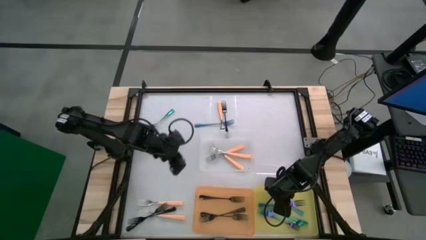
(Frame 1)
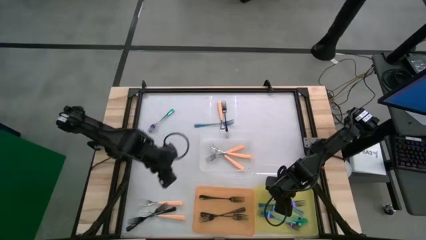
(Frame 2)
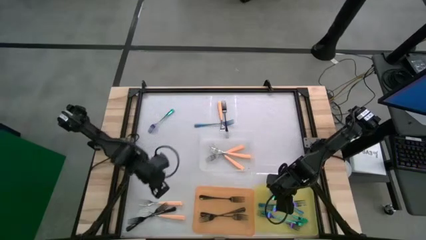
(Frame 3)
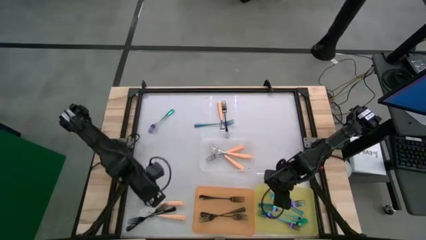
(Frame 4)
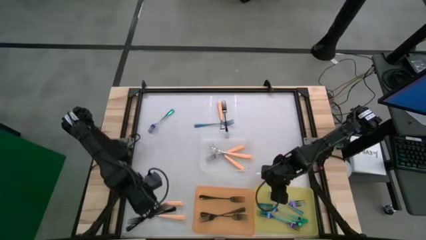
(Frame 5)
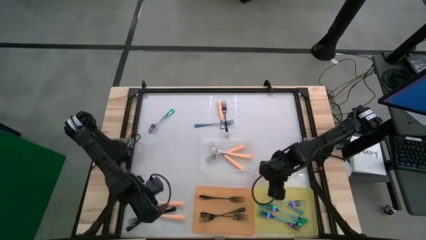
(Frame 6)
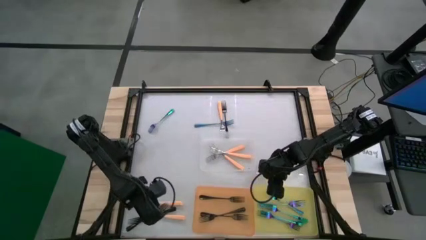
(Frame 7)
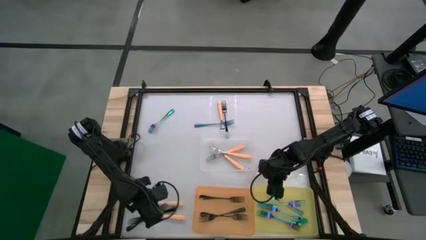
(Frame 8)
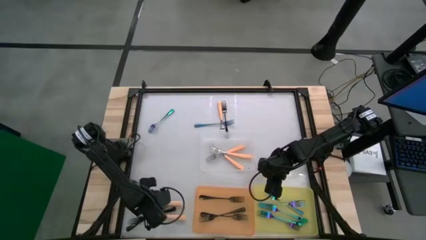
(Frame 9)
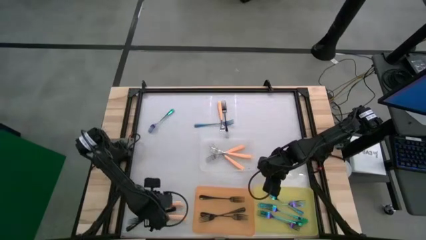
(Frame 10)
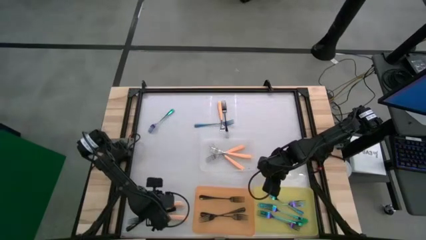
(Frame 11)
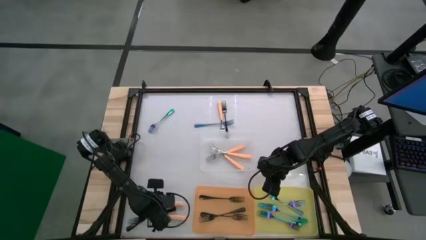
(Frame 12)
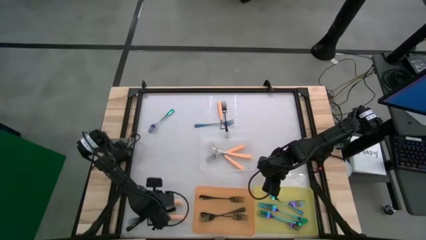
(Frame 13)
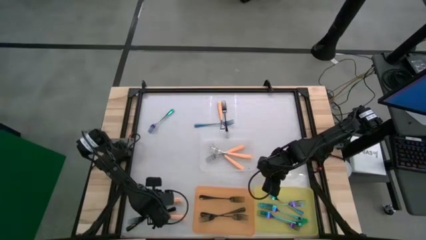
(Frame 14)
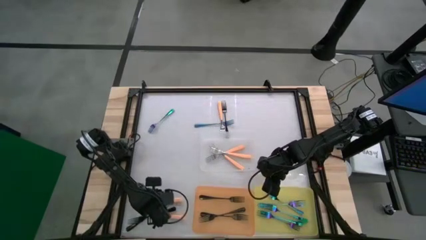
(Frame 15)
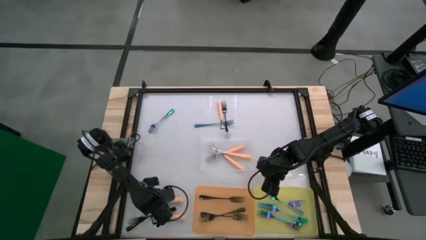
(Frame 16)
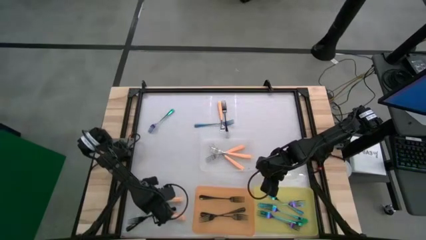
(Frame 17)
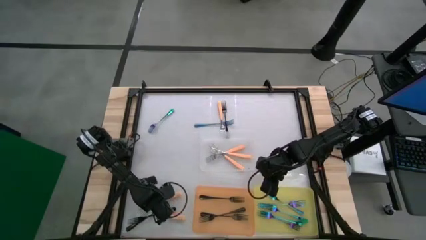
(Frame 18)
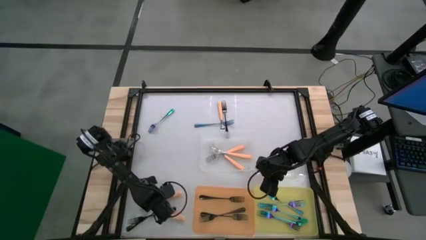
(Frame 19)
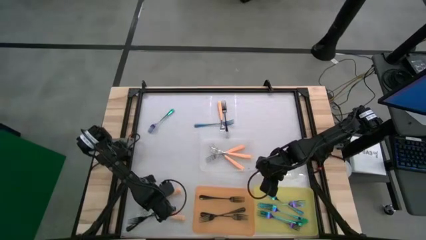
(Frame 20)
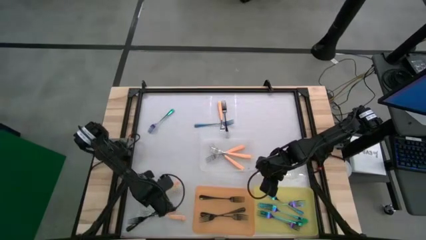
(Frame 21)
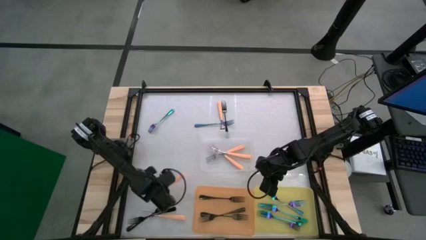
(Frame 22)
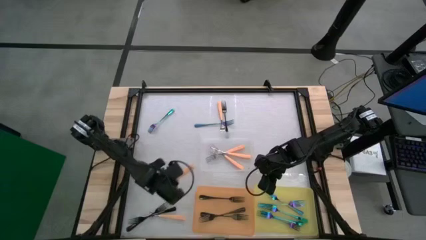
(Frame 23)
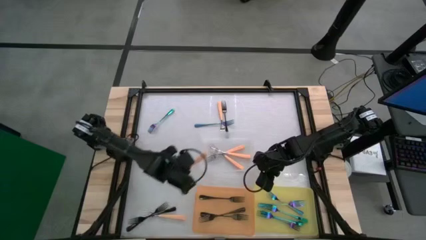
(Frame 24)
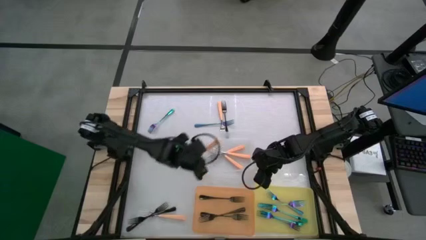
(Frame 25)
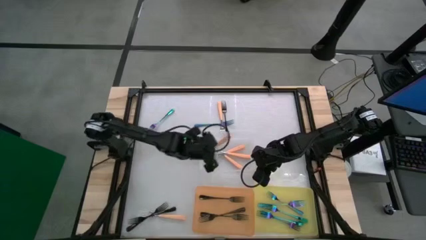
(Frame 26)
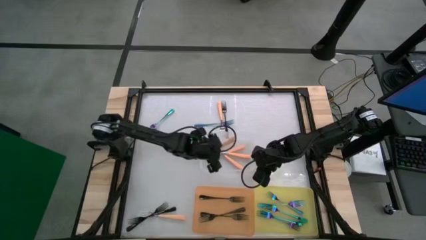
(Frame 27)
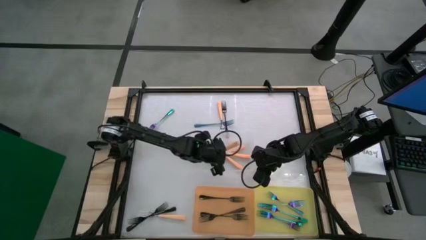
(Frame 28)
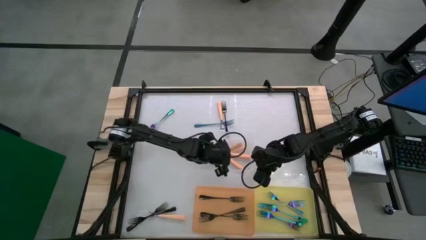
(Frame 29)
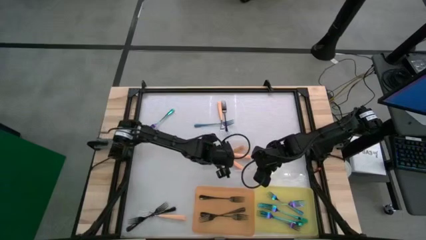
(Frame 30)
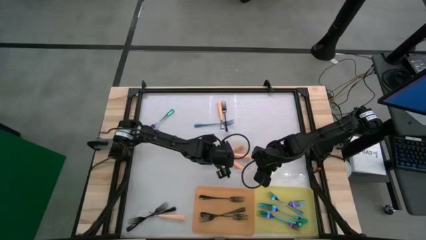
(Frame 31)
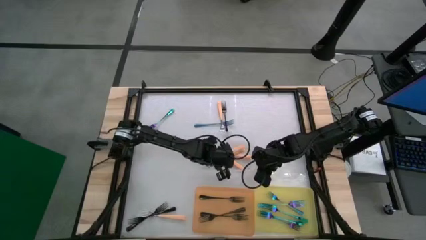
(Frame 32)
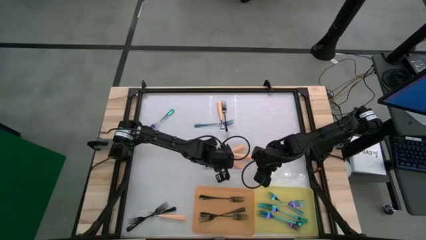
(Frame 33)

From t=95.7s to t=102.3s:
Task: Sort silverware by color (type)
Put the orange fork into the transparent bin

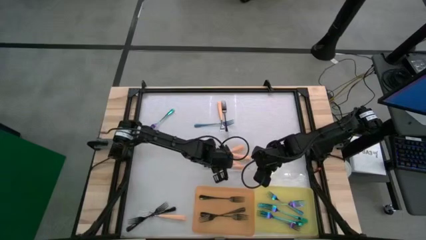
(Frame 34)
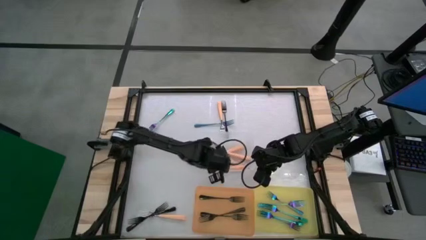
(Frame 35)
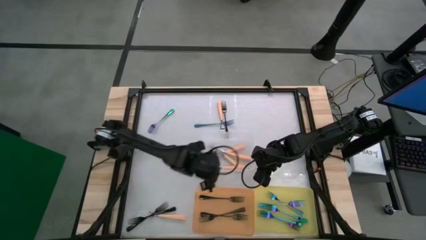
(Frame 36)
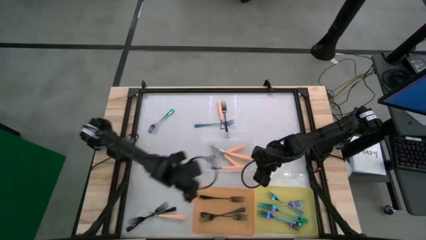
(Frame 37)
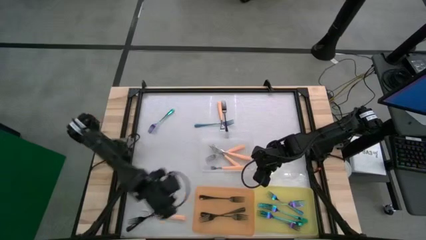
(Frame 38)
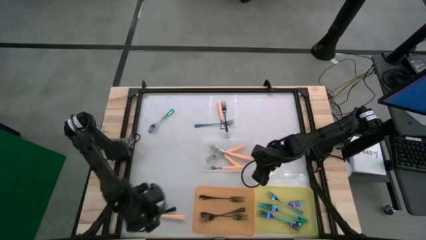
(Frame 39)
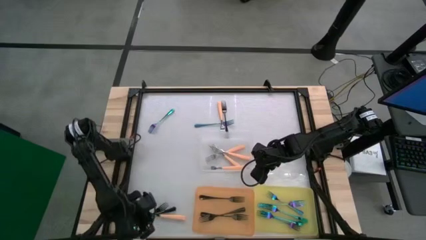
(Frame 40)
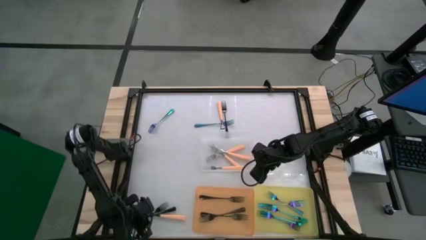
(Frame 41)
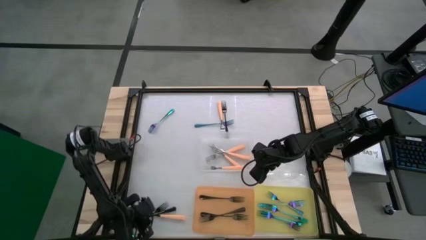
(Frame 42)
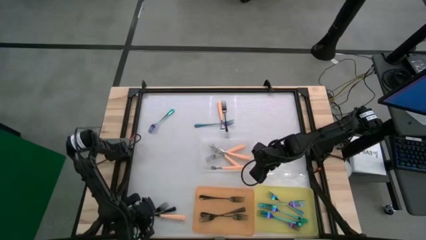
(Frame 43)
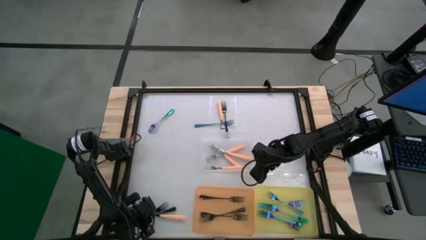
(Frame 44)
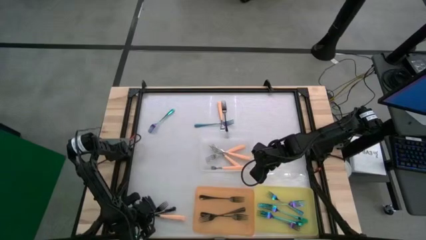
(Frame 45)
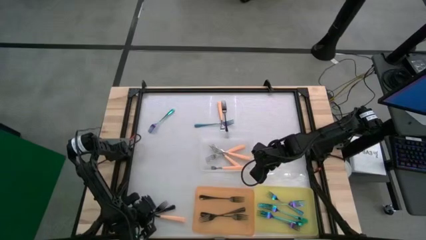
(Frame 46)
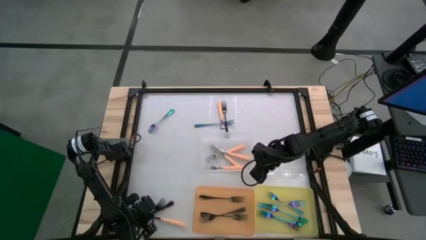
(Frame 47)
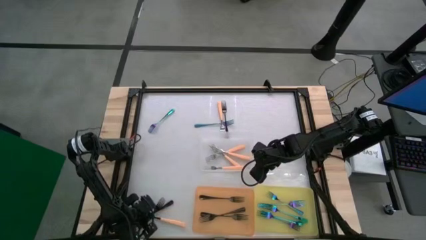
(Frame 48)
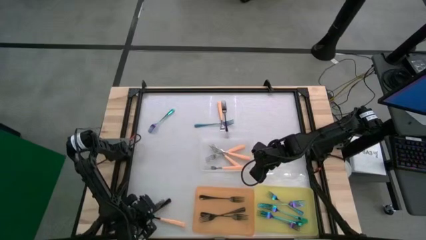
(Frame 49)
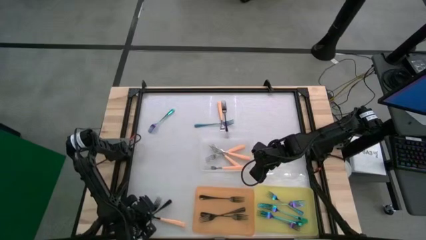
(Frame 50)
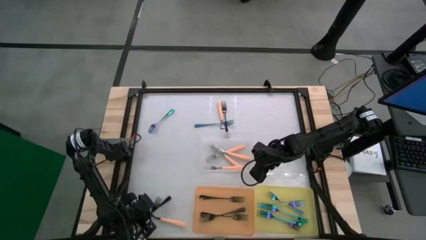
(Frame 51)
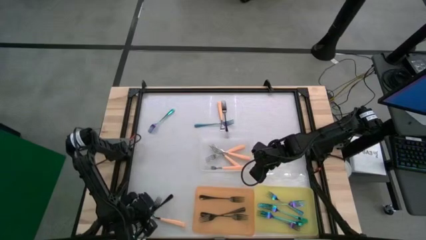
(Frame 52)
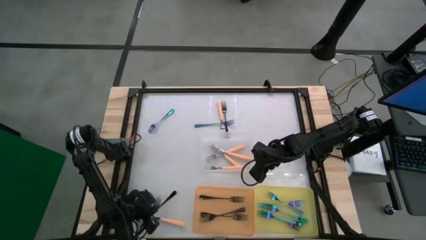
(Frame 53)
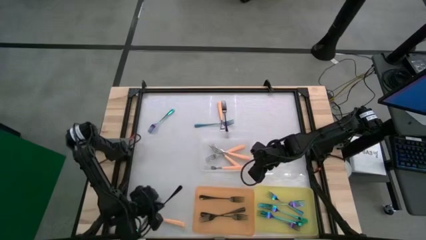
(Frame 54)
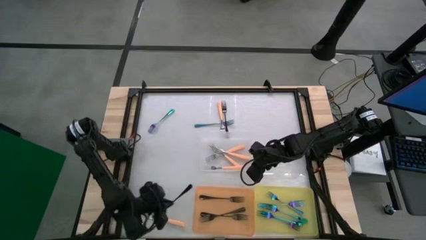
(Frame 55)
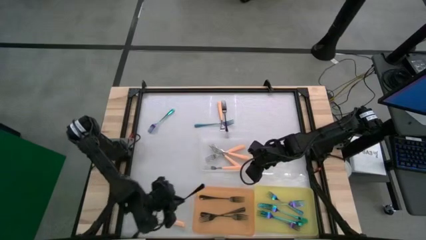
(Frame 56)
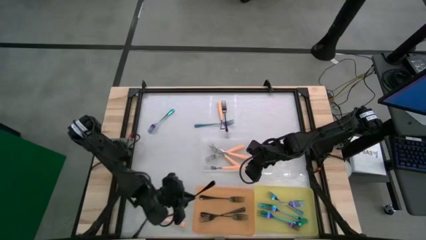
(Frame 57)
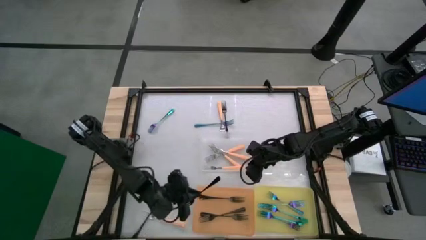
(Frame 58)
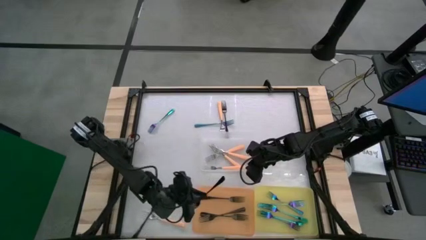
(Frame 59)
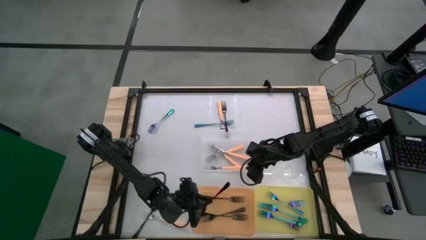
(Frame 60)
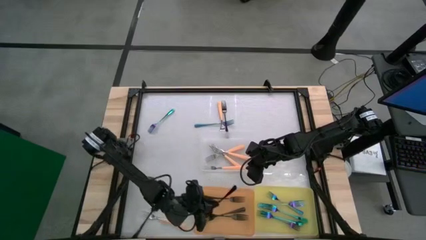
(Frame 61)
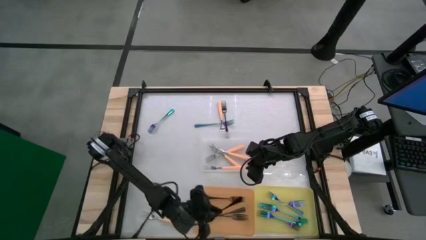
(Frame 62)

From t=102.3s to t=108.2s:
Put the black fork into the orange bin

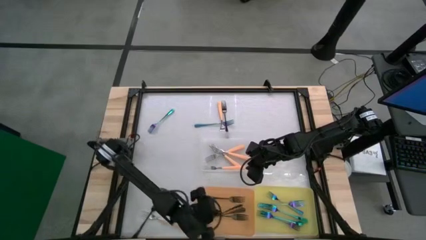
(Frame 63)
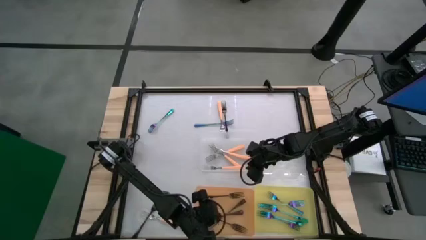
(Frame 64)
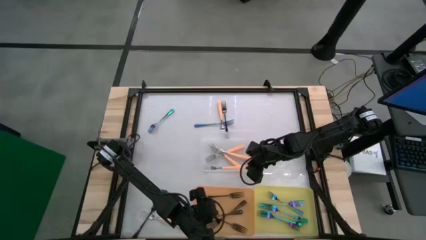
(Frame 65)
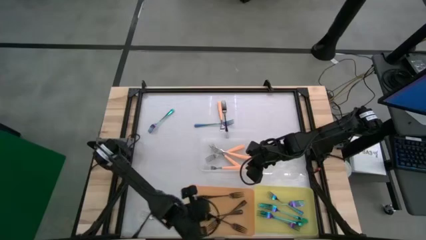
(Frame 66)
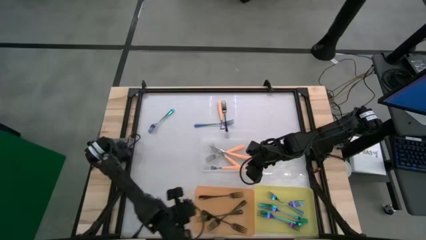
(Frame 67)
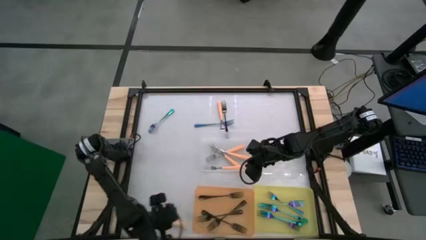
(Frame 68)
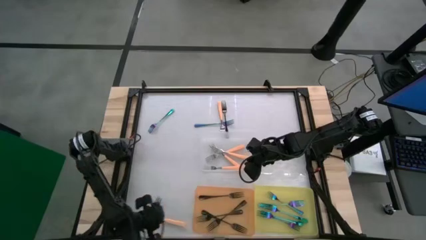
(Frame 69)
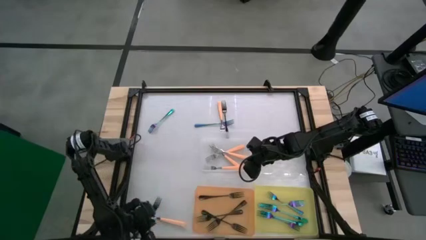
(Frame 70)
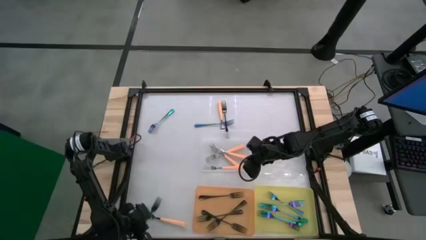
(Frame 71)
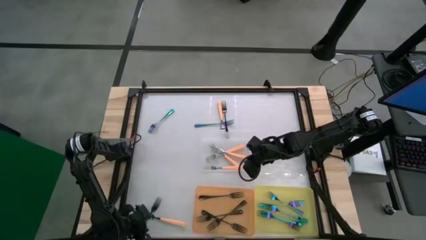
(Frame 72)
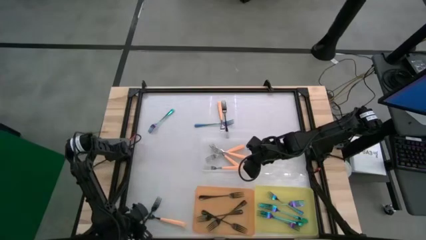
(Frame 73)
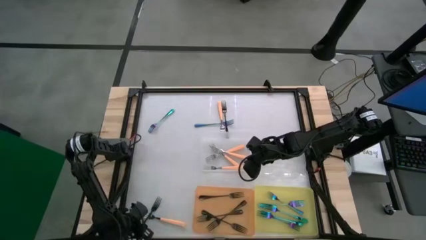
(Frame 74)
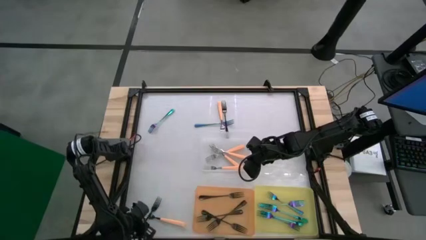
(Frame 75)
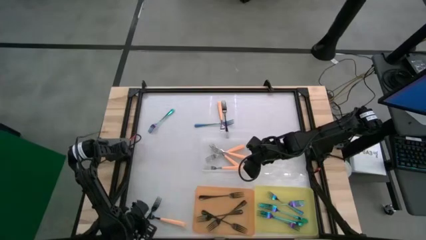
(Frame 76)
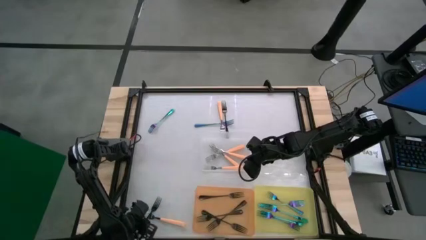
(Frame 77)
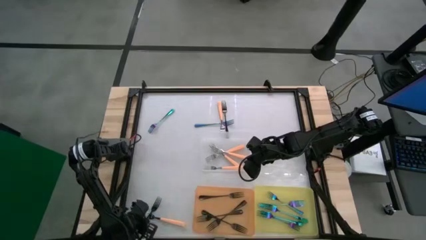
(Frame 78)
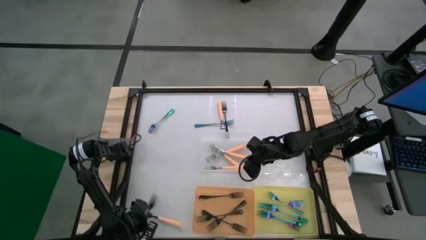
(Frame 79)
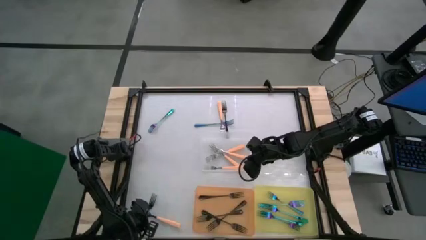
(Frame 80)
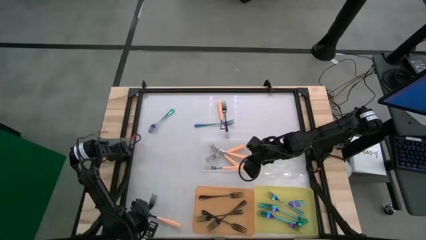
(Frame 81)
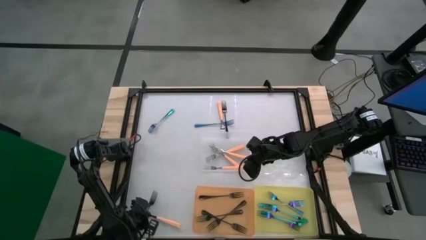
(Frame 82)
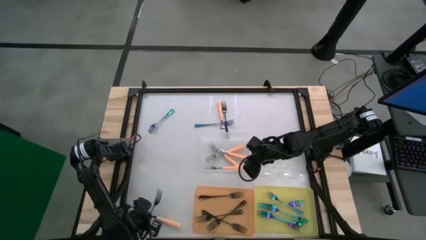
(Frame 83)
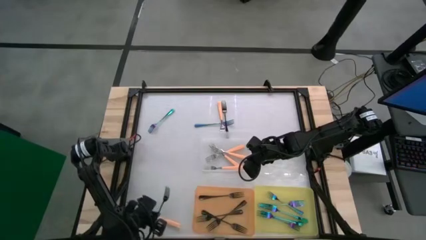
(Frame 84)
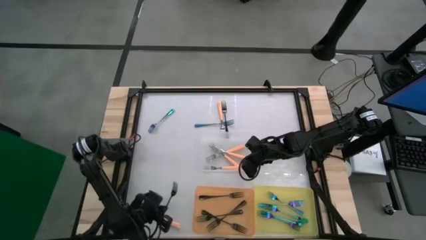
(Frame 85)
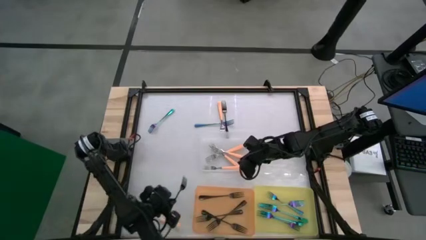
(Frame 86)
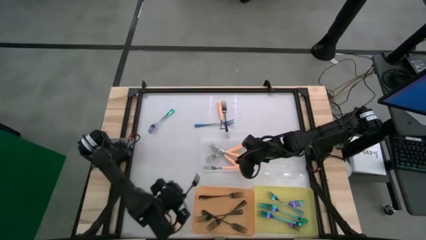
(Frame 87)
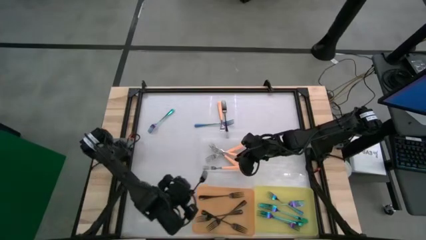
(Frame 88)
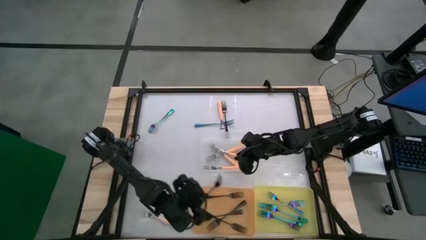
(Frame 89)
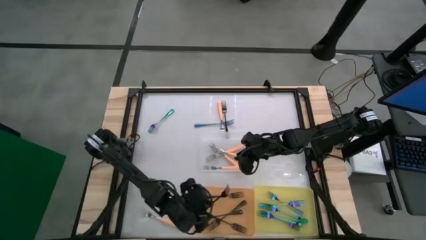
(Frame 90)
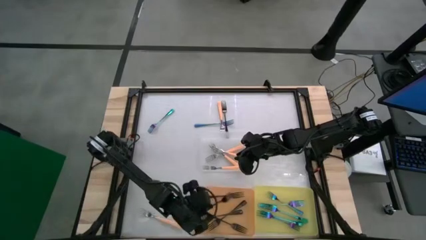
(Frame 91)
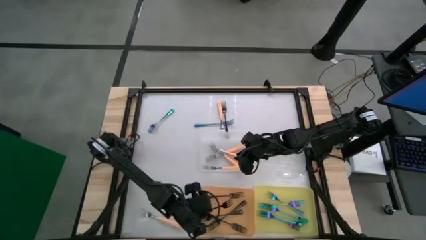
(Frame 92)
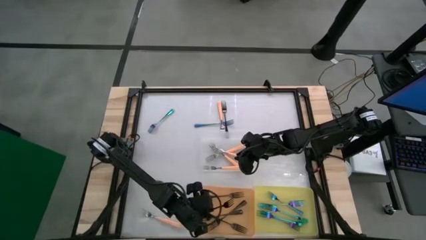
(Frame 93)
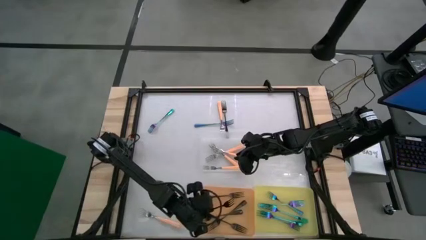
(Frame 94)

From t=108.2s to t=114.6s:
Put the black fork into the orange bin
